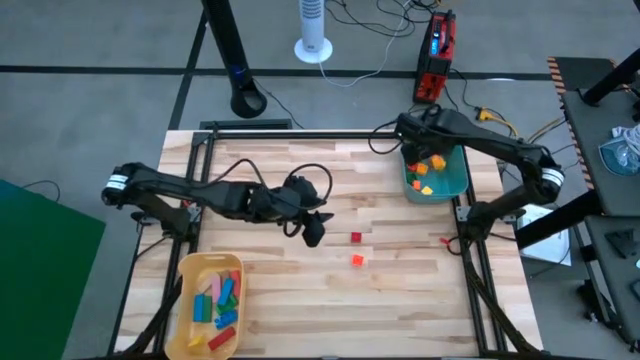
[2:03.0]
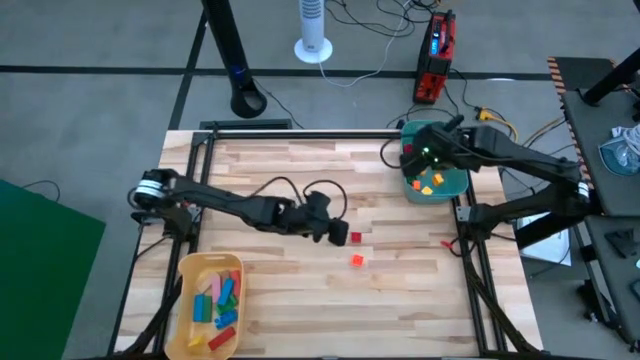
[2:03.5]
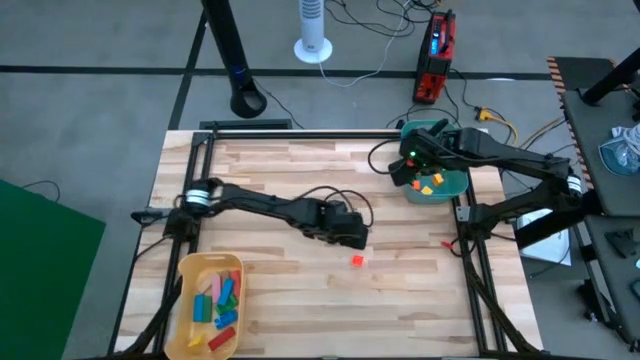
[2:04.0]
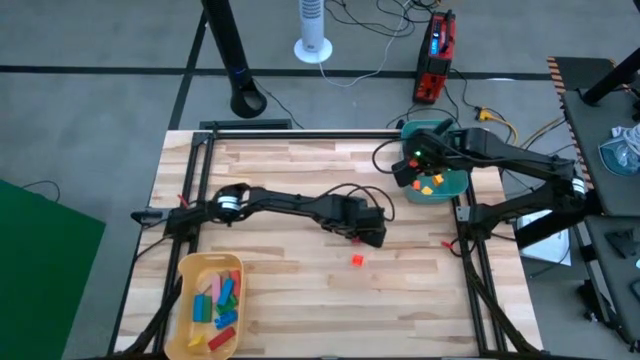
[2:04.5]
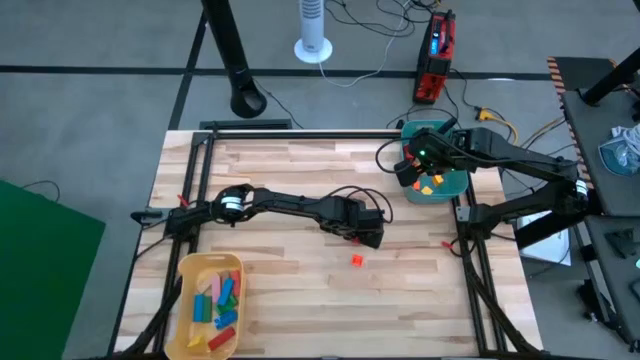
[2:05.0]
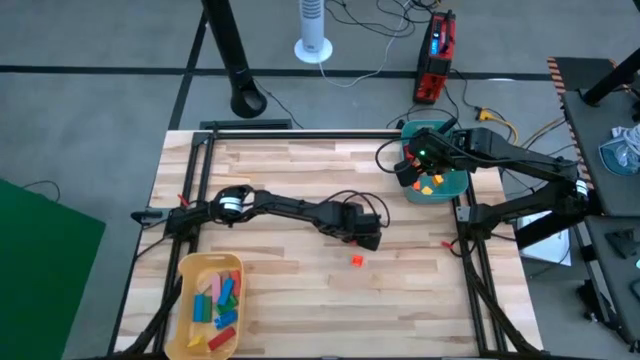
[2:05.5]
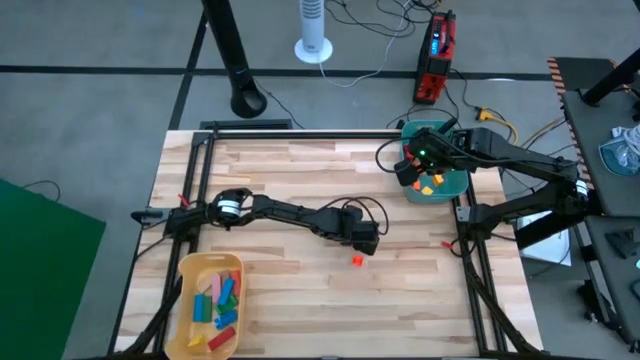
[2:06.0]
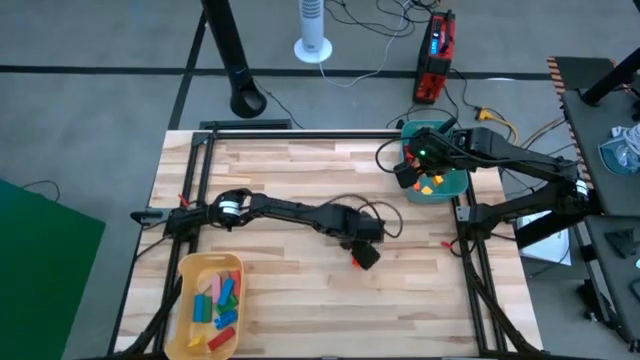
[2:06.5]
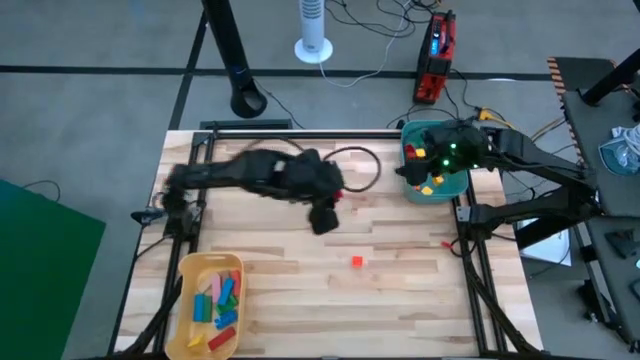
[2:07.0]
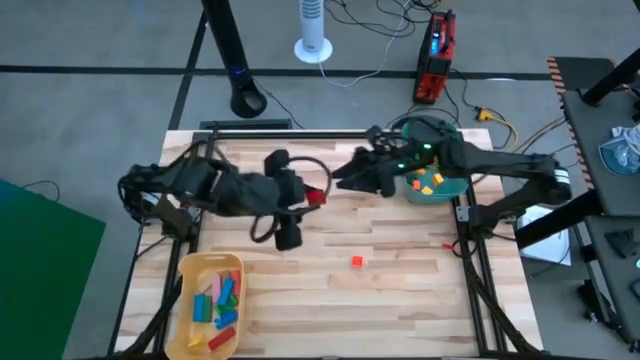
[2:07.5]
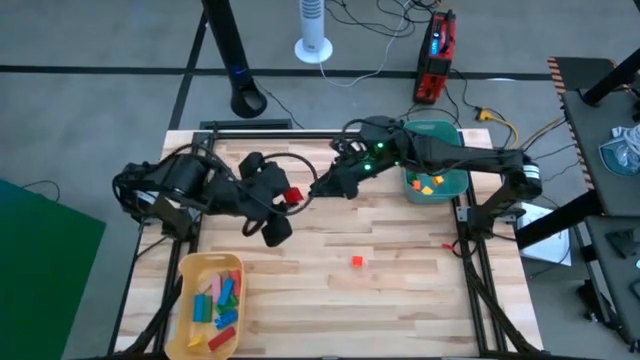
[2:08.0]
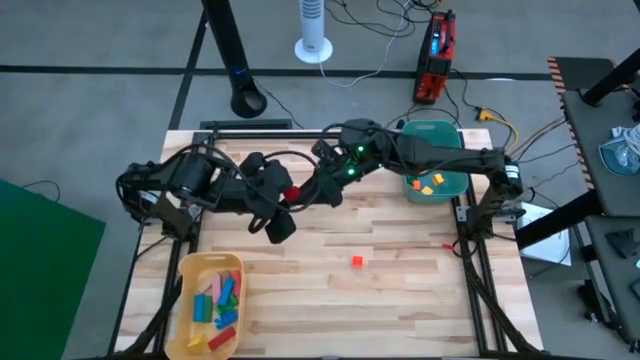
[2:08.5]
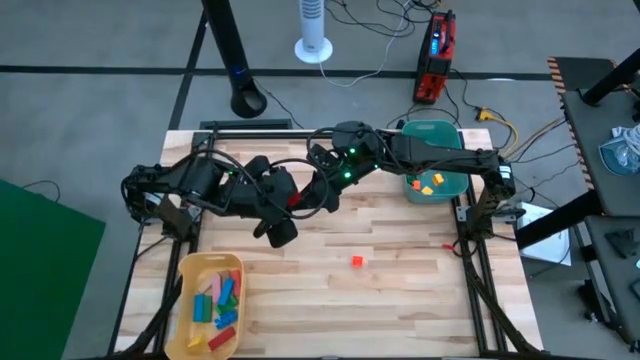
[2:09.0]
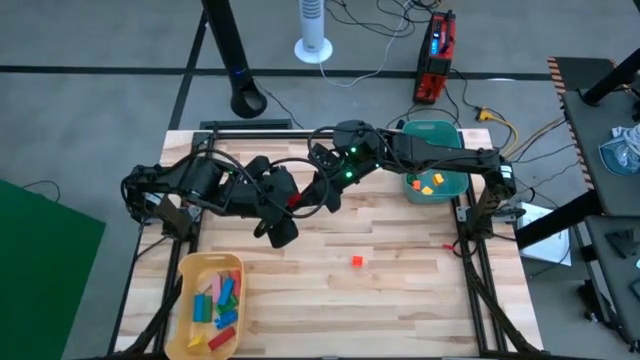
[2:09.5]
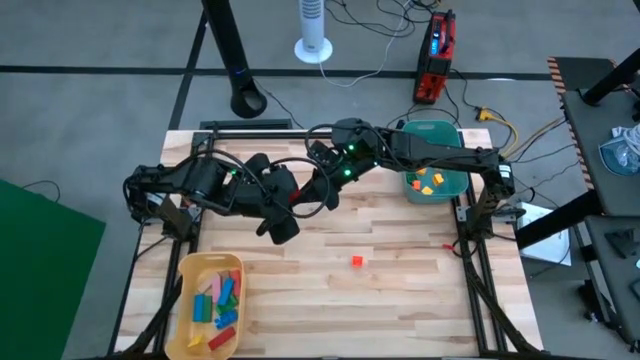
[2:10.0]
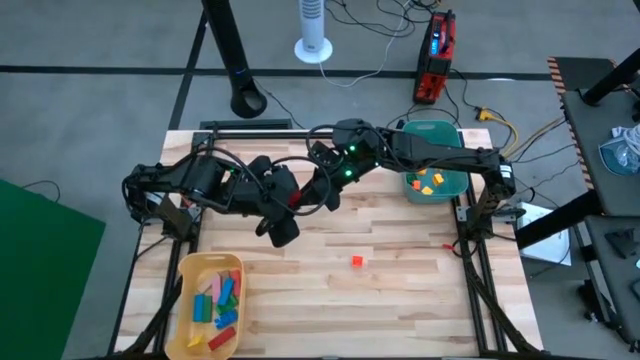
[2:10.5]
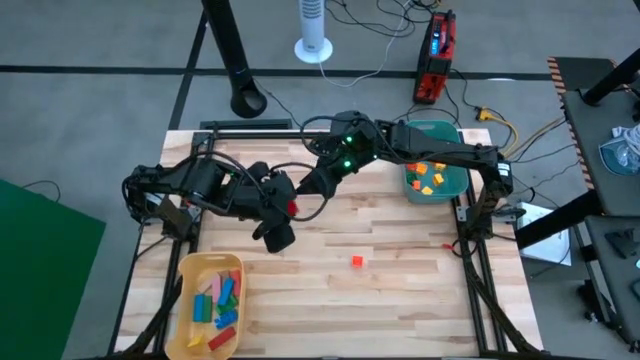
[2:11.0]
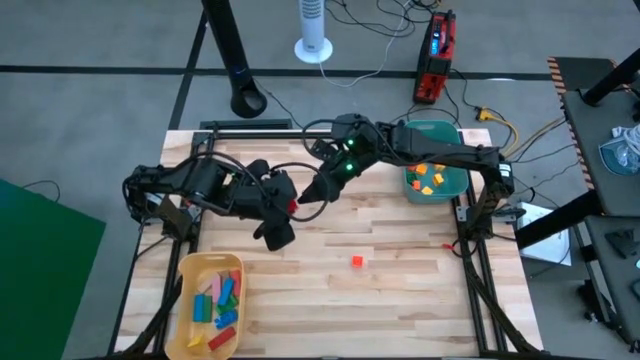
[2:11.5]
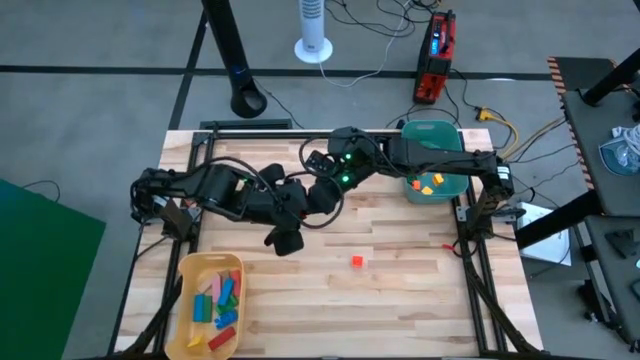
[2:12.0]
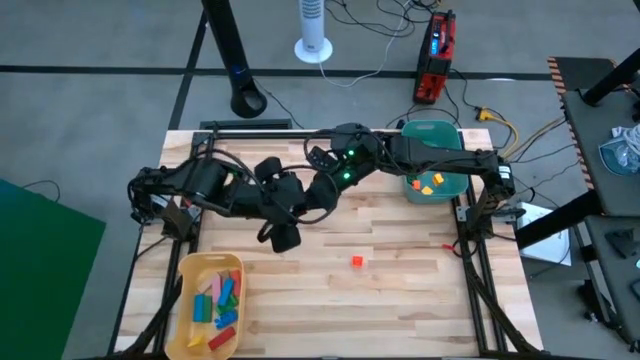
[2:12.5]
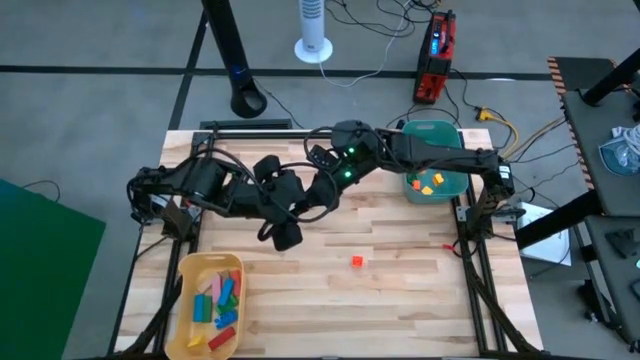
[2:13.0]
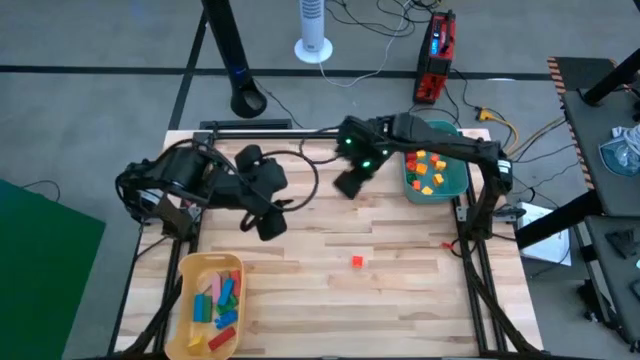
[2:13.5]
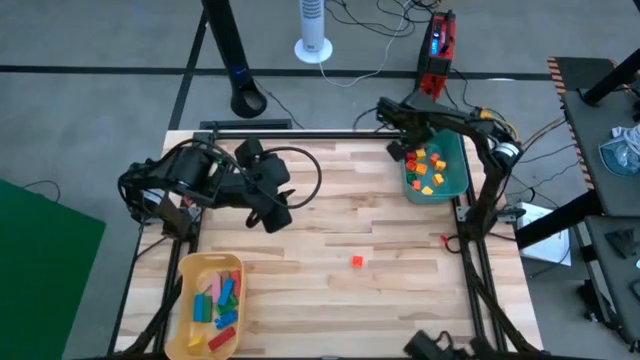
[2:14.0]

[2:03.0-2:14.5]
Task: Sort blocks
Put the red 4-stud game piece into the green bin

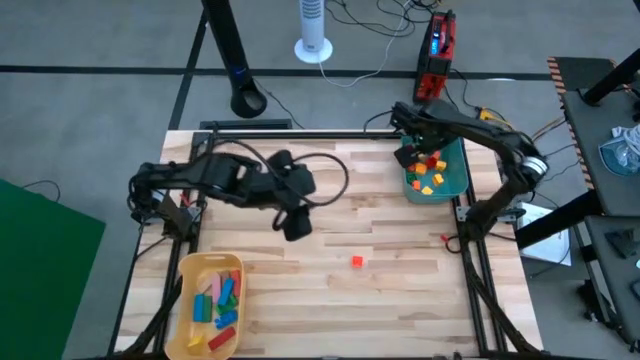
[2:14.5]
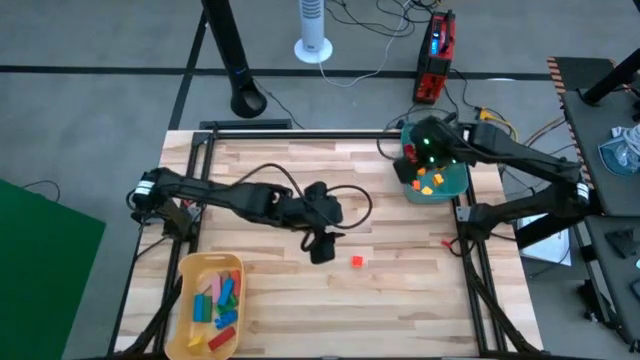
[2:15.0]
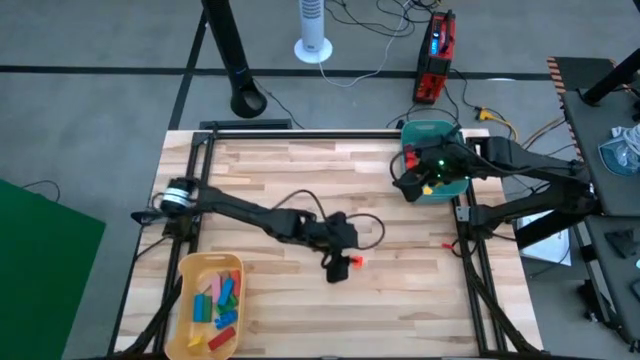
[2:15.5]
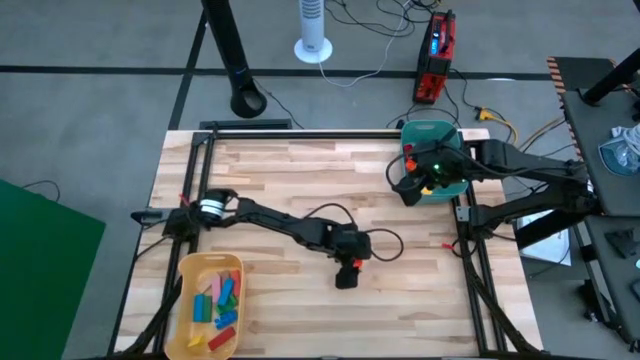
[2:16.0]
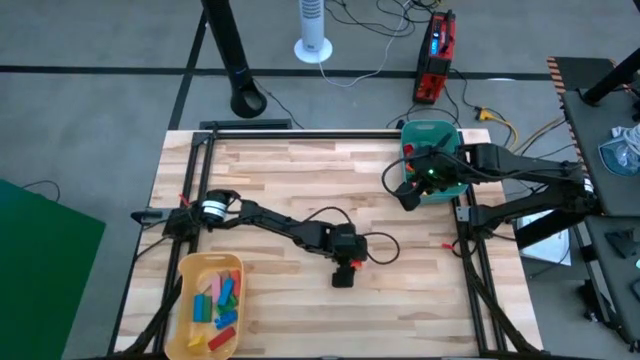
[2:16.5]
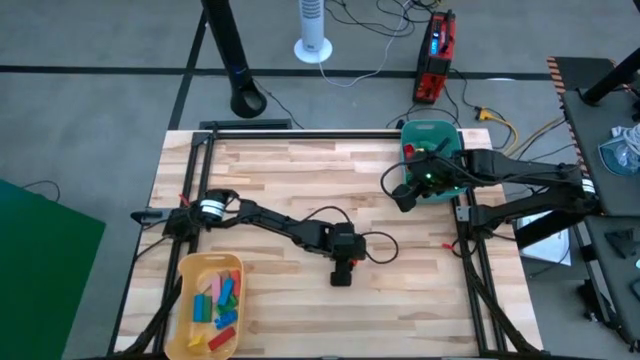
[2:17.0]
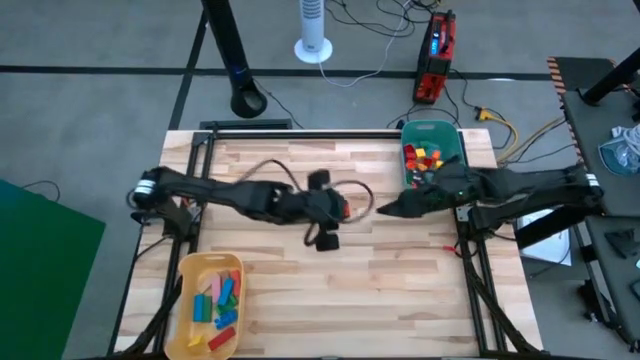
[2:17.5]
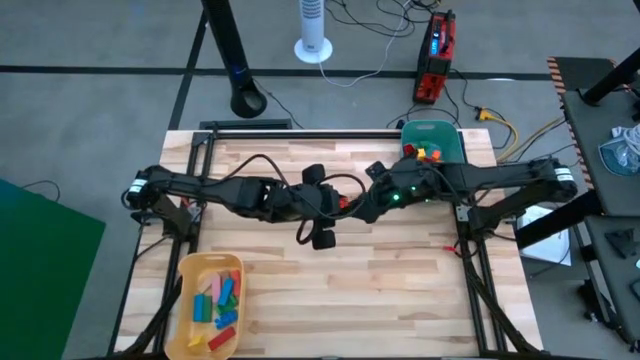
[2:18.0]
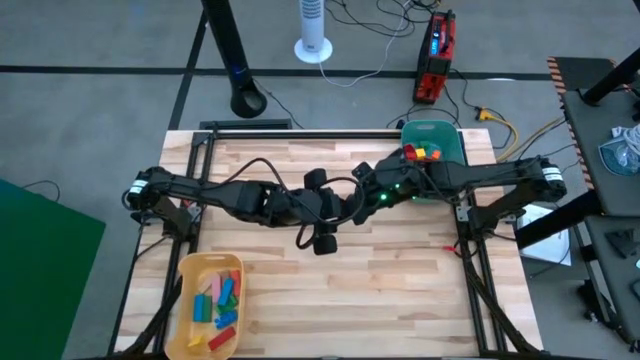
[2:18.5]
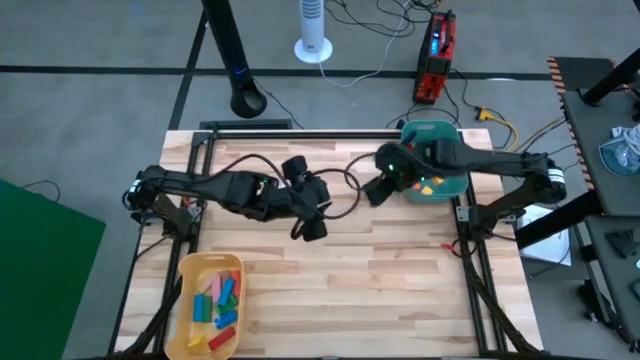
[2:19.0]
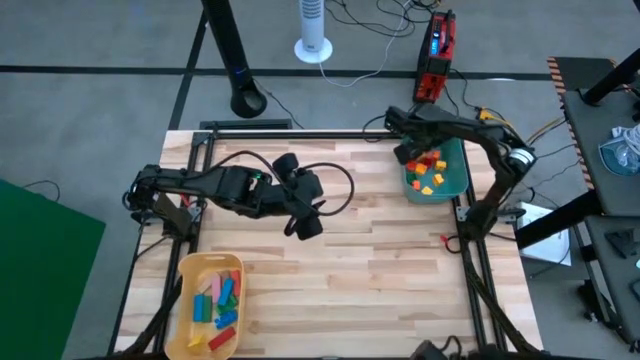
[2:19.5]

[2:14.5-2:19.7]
Put the orange 4-stud game piece into the green bin

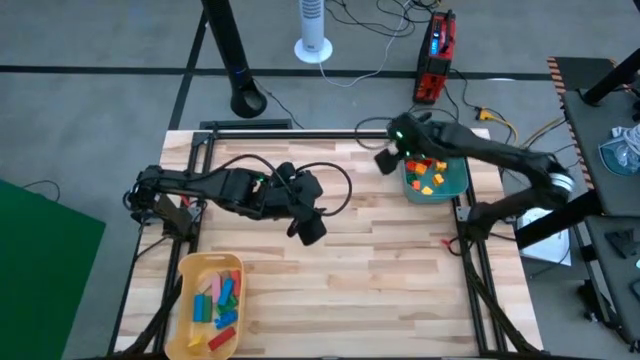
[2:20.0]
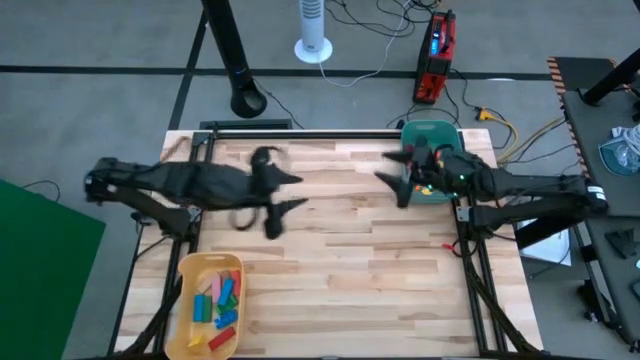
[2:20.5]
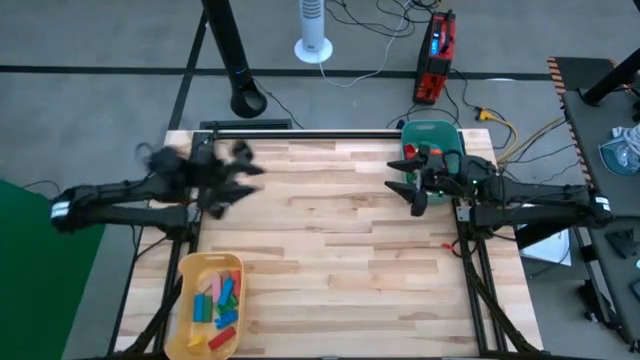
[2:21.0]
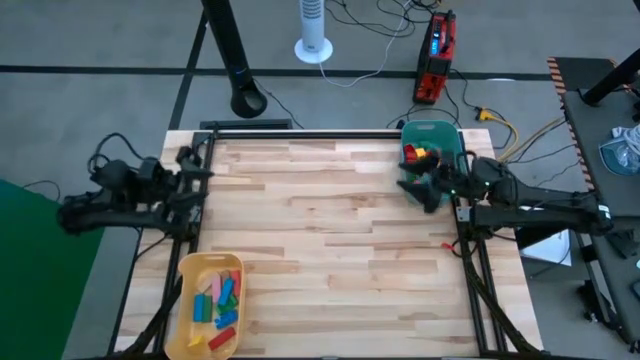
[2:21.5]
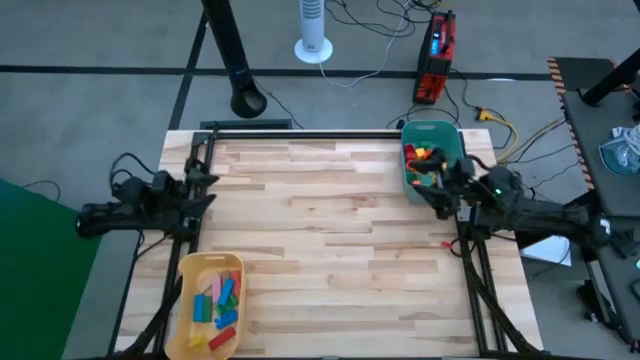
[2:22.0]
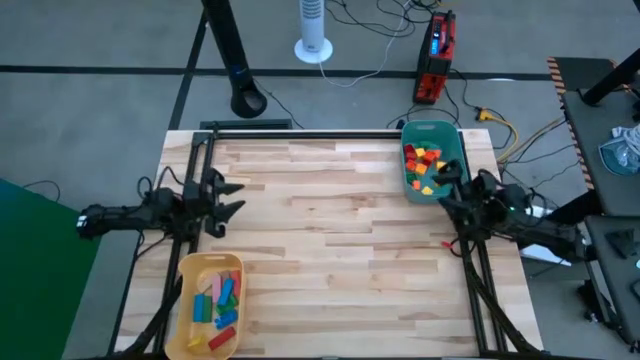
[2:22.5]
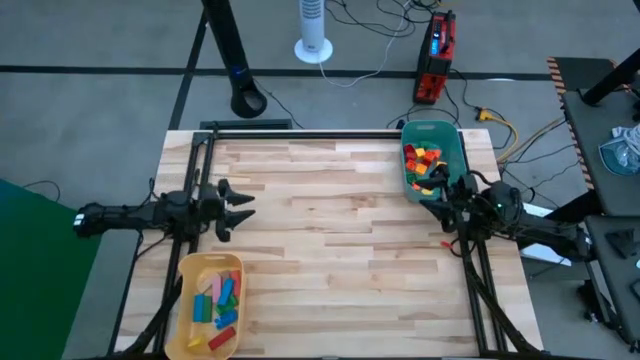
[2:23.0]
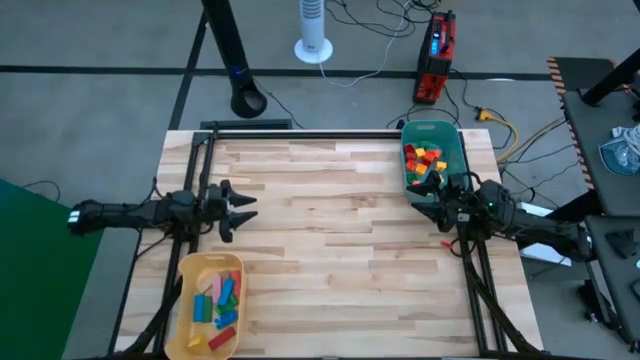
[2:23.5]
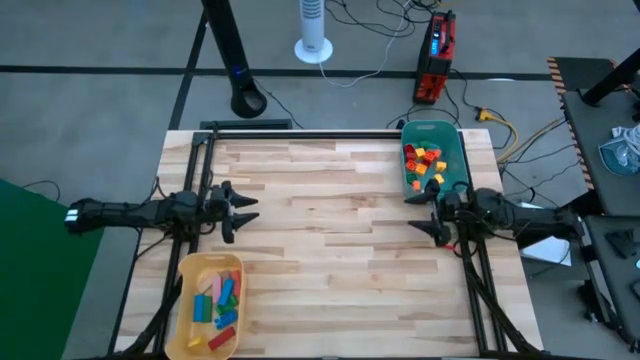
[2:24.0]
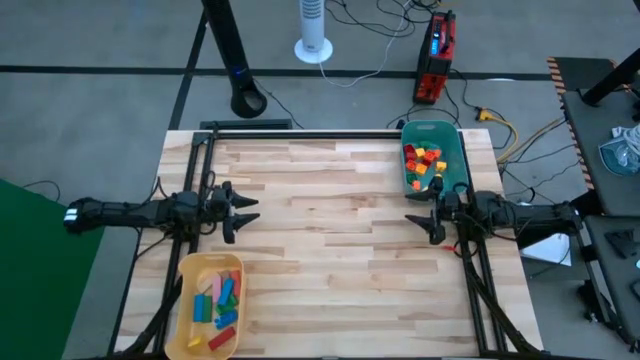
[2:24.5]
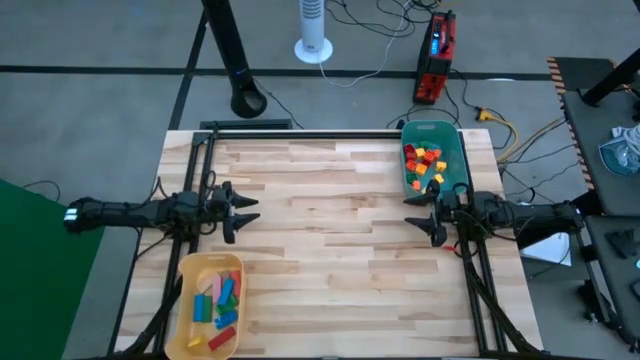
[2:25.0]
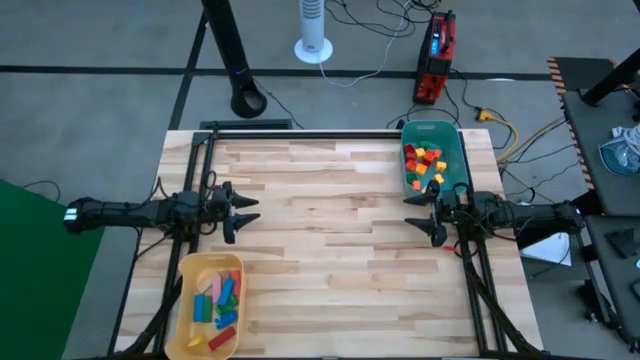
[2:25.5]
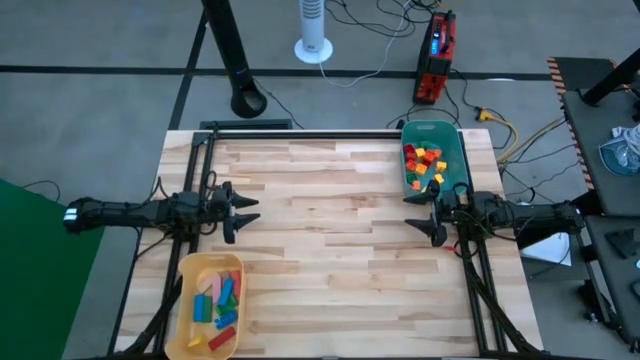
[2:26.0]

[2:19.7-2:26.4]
Return to Home Position
